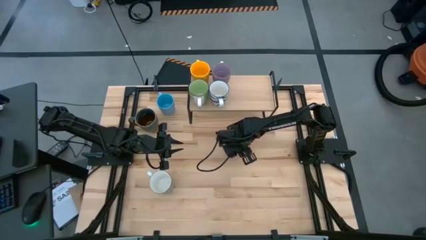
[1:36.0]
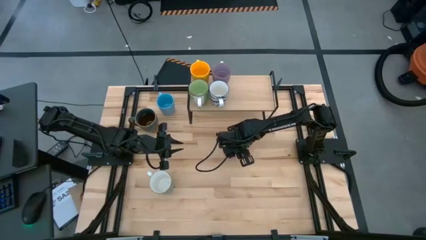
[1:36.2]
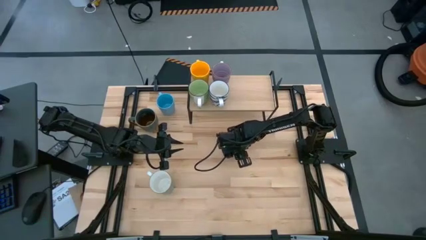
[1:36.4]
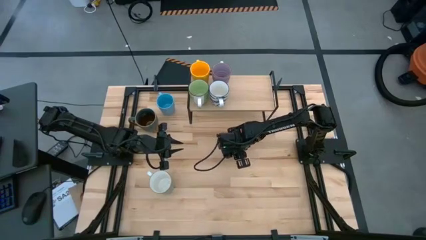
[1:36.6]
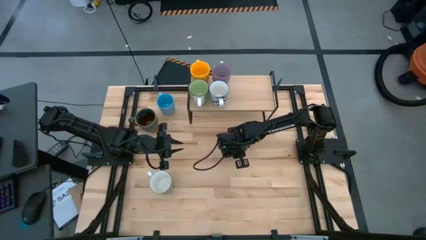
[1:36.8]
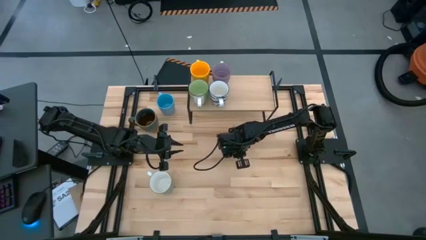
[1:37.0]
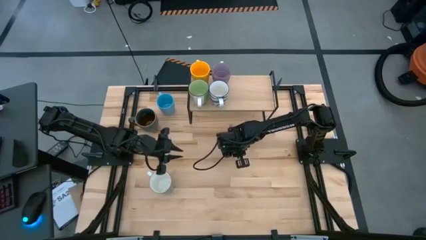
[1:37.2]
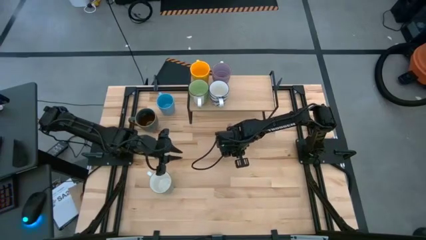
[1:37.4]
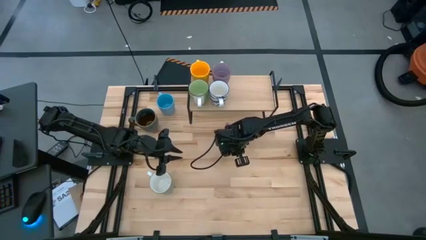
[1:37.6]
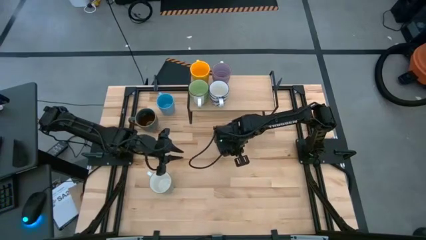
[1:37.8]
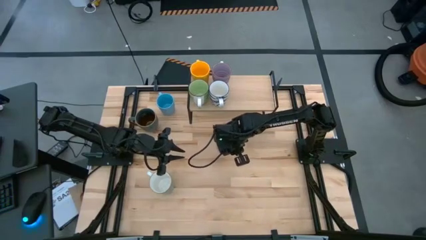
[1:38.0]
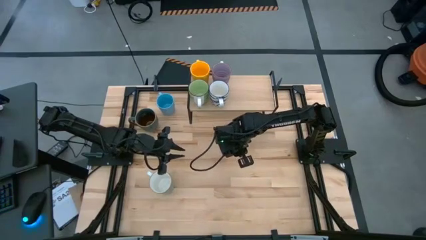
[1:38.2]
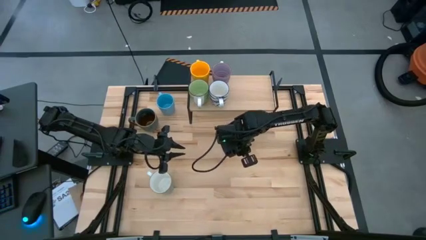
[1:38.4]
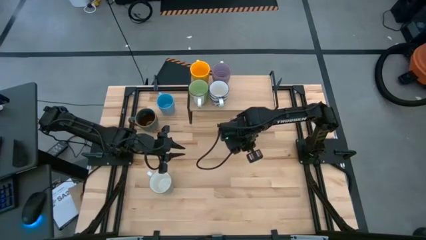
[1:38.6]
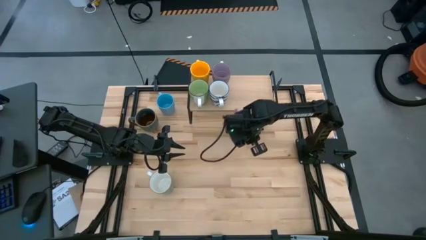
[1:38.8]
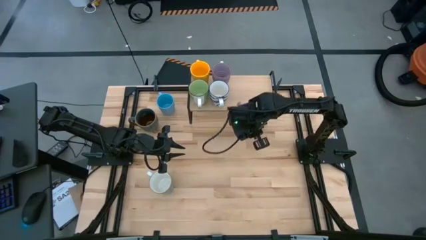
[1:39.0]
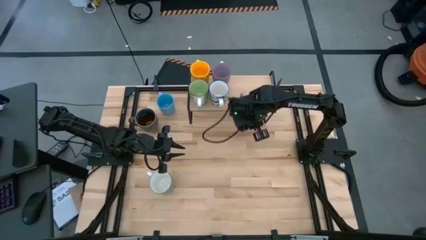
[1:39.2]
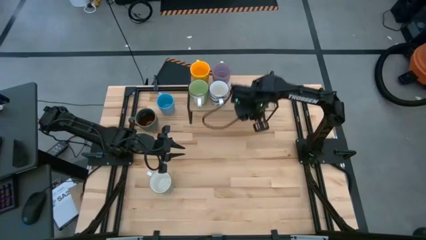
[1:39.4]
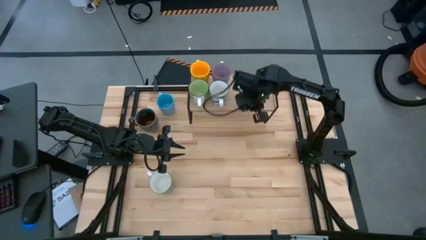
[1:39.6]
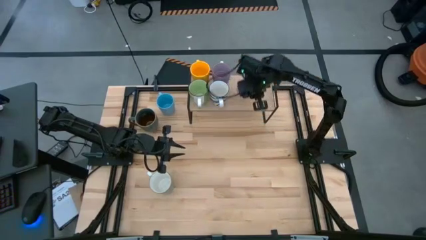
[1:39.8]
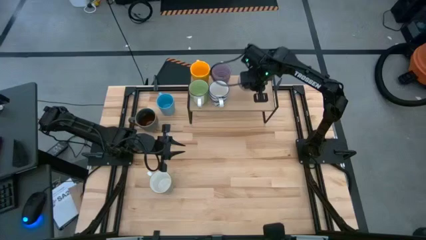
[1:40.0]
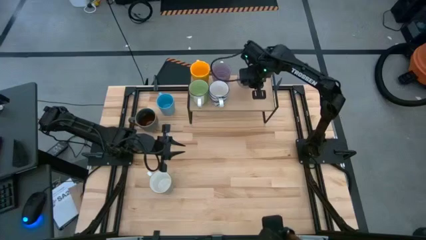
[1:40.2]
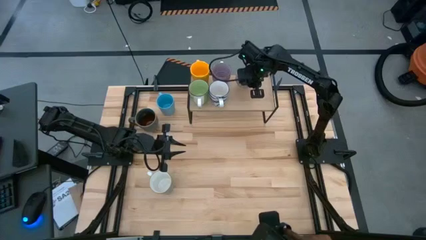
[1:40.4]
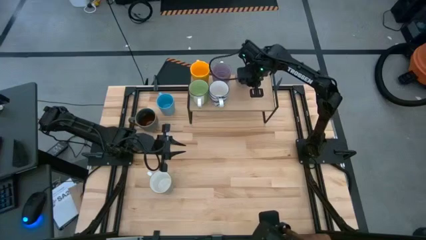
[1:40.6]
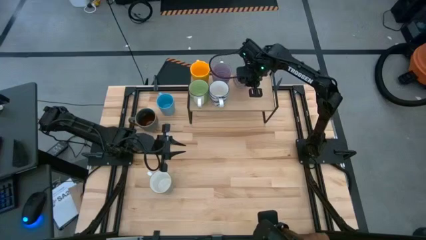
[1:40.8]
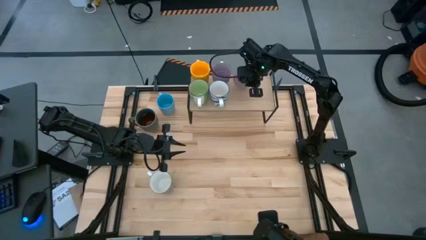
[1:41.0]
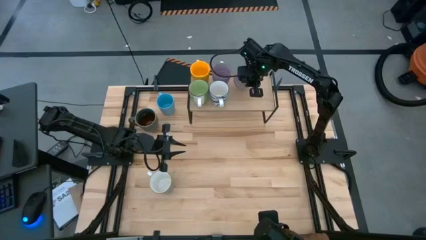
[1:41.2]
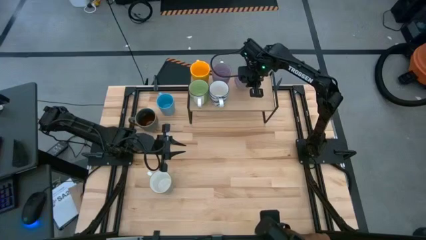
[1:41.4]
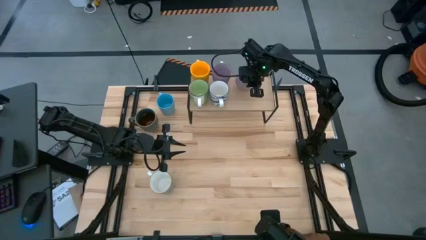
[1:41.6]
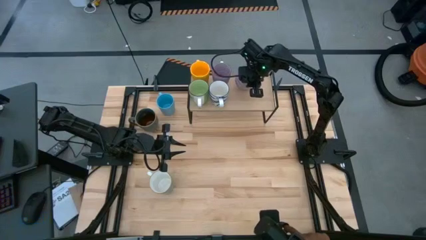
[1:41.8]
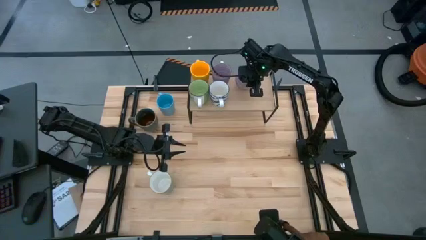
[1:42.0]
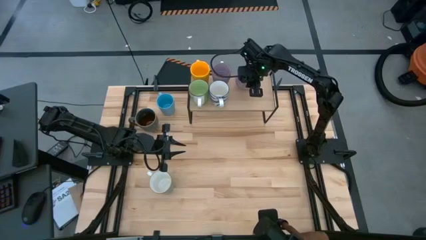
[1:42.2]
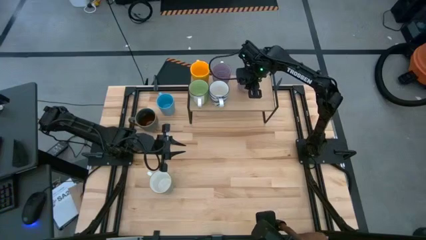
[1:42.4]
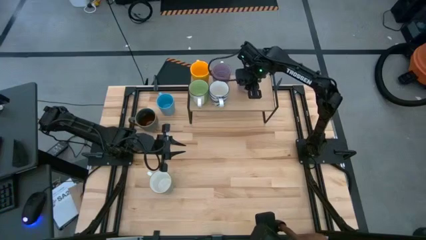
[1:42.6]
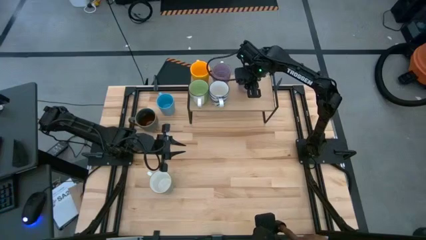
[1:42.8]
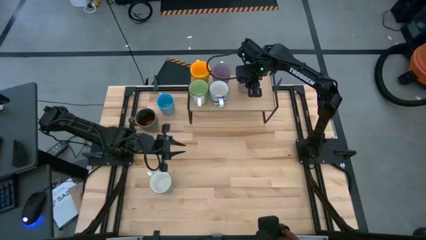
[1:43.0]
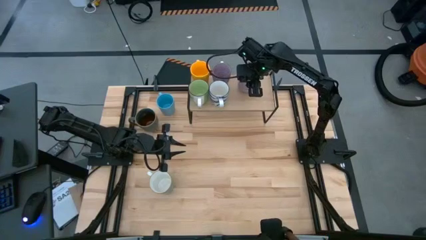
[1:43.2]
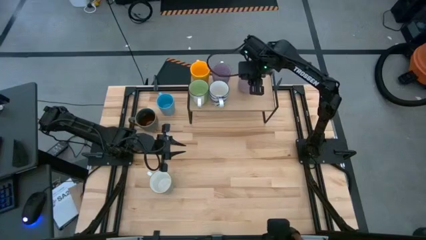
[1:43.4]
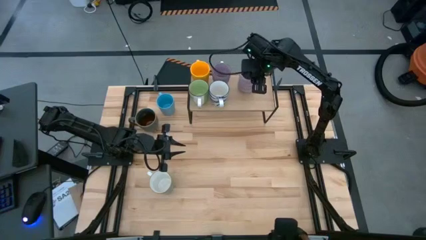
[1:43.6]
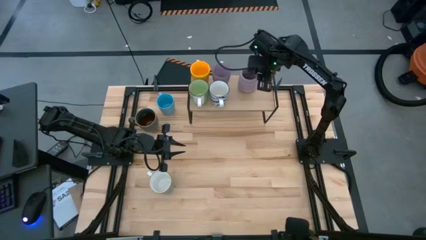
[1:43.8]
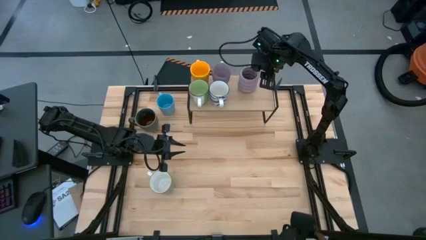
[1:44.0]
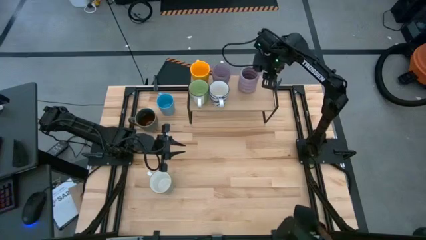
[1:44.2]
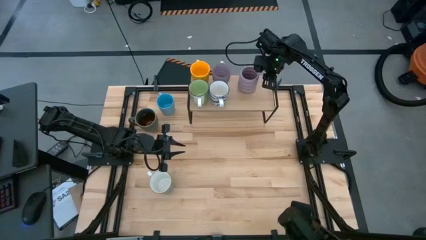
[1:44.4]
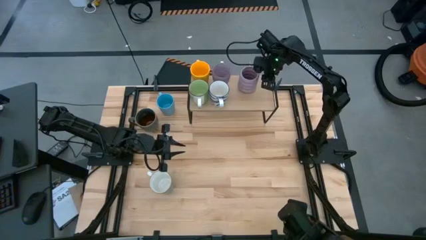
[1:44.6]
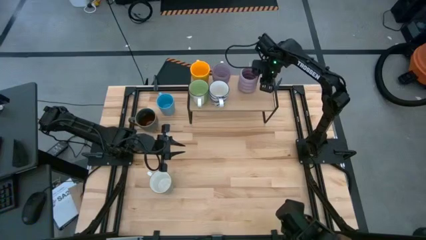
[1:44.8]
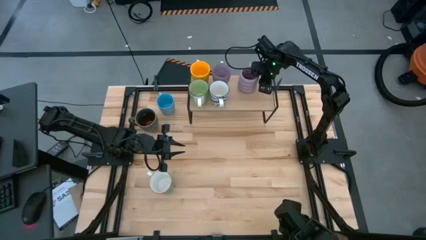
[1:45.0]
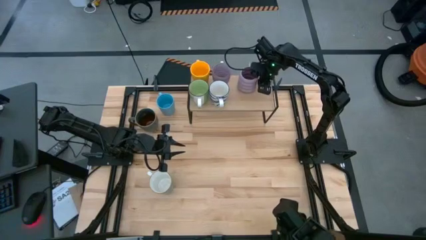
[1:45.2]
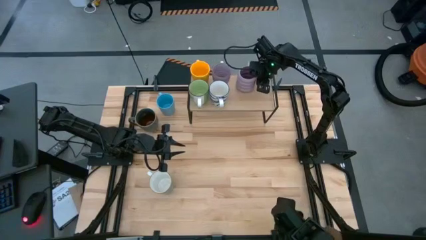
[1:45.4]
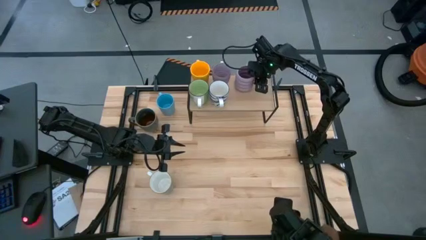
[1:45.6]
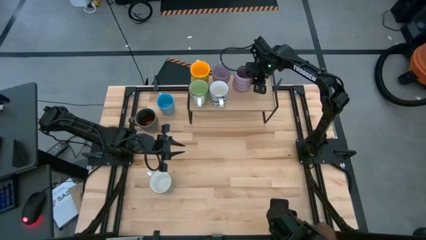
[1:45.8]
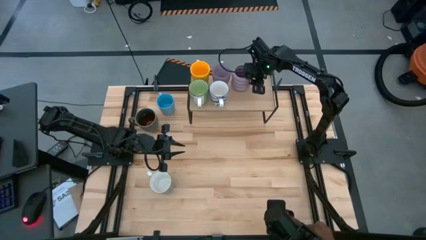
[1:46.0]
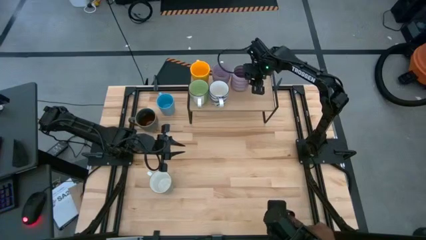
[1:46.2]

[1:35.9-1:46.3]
Task: Place coffee mugs
Put the purple mug on the shelf
